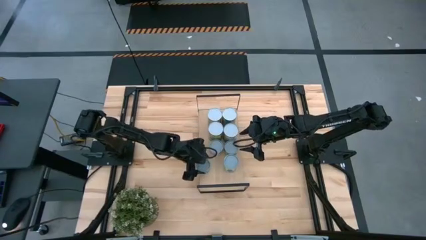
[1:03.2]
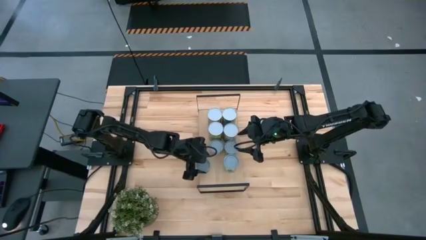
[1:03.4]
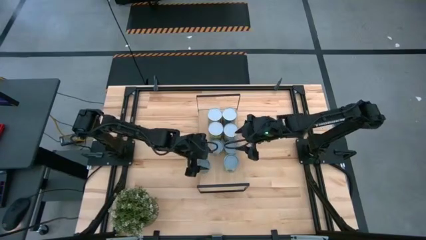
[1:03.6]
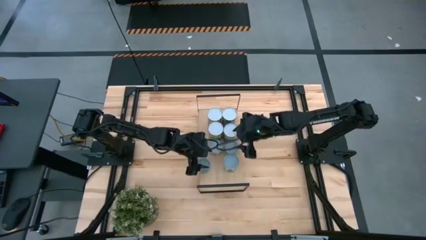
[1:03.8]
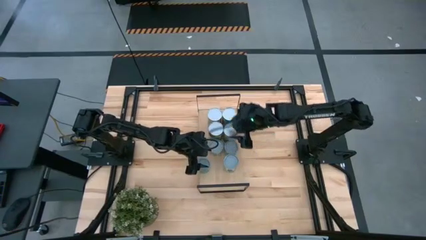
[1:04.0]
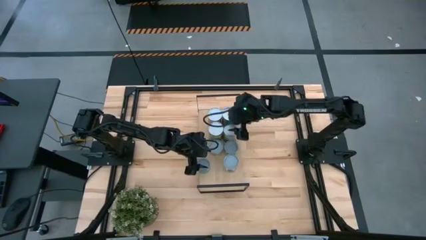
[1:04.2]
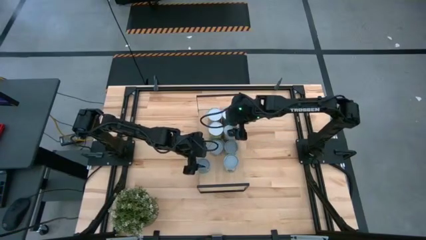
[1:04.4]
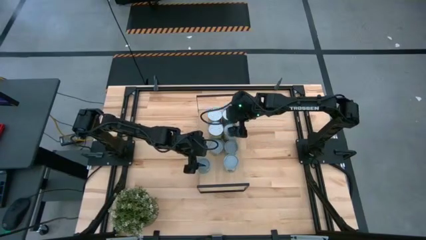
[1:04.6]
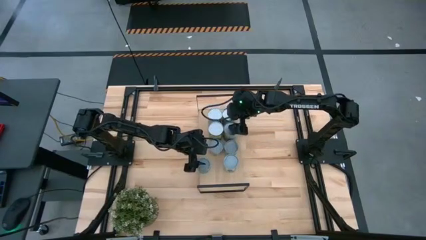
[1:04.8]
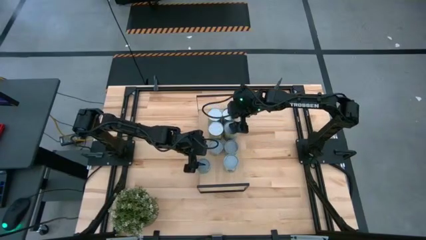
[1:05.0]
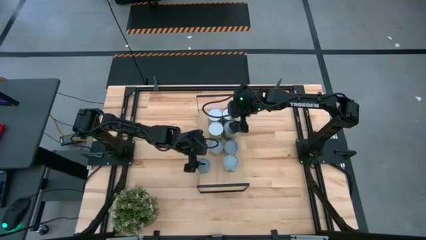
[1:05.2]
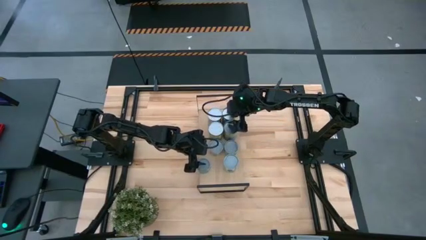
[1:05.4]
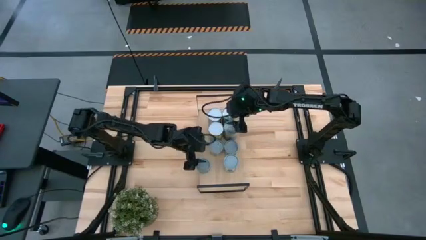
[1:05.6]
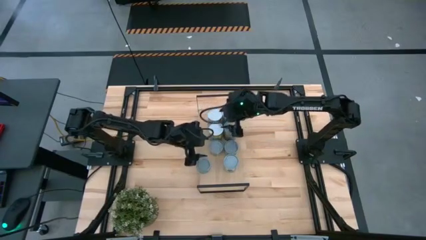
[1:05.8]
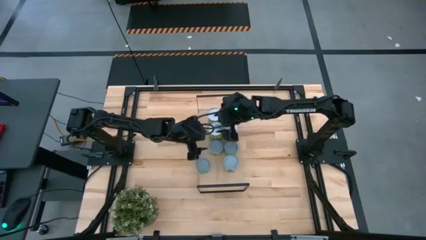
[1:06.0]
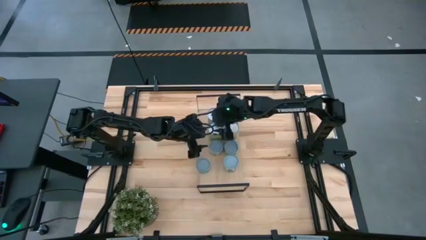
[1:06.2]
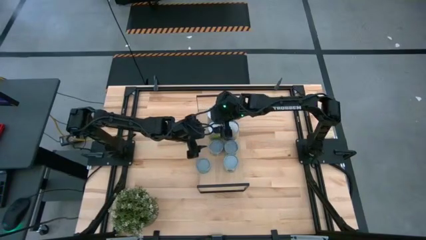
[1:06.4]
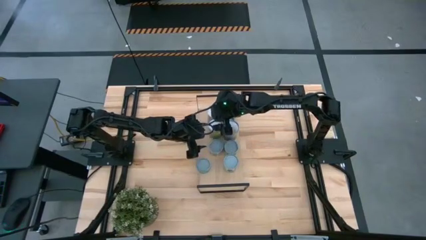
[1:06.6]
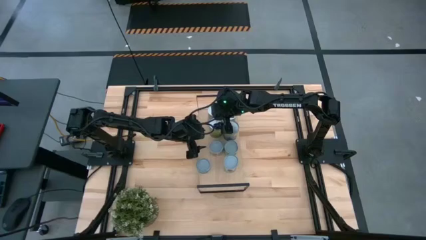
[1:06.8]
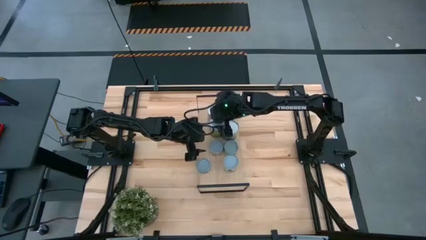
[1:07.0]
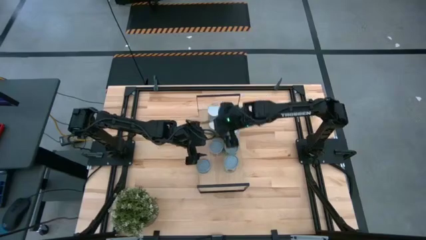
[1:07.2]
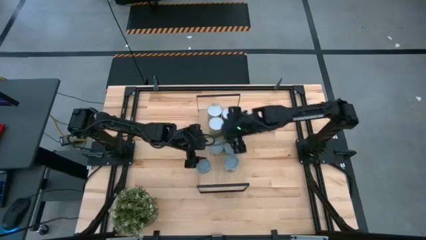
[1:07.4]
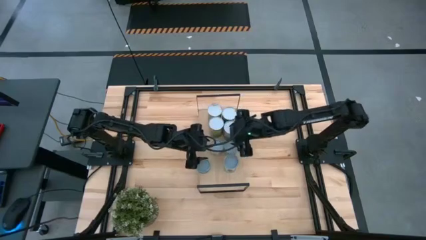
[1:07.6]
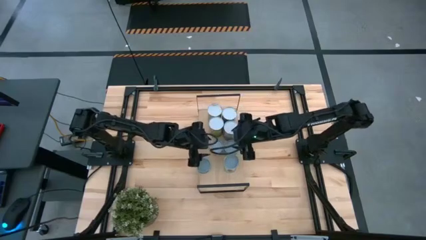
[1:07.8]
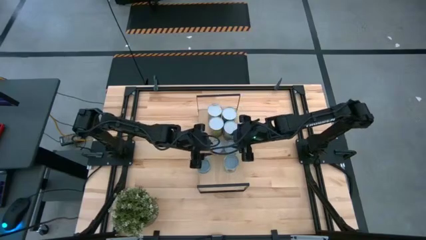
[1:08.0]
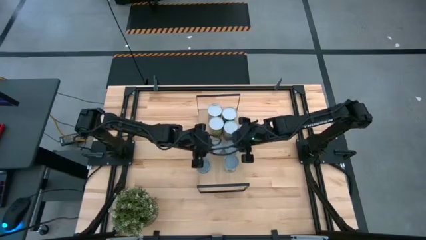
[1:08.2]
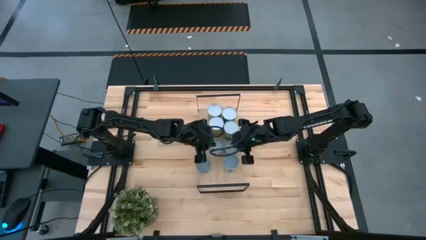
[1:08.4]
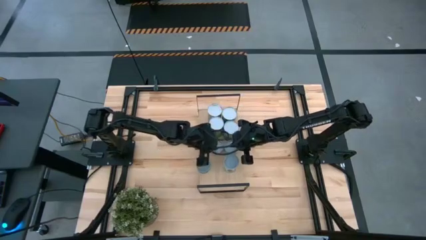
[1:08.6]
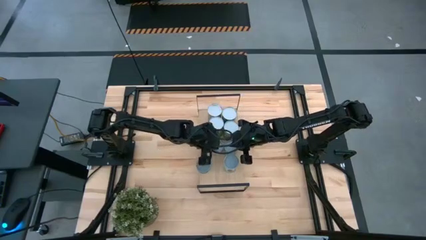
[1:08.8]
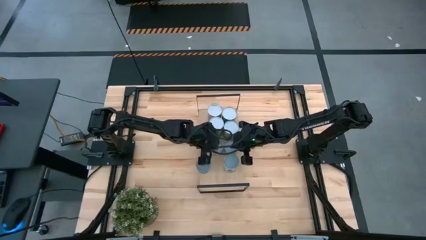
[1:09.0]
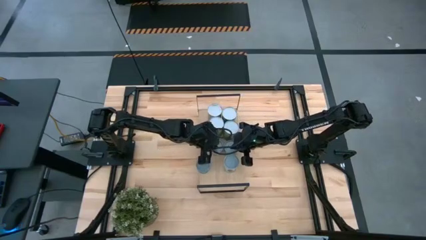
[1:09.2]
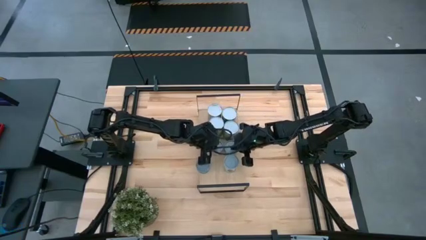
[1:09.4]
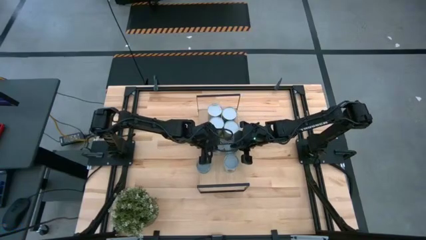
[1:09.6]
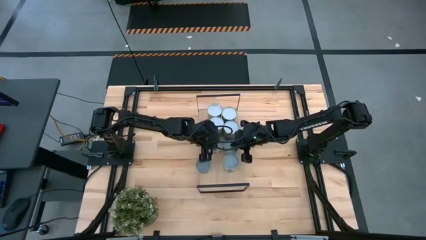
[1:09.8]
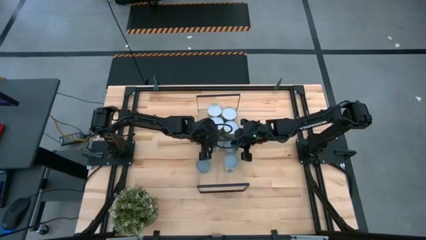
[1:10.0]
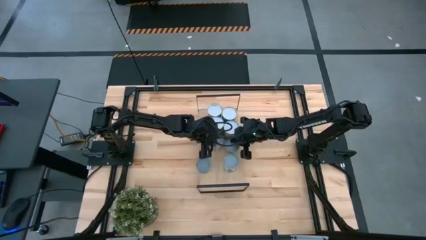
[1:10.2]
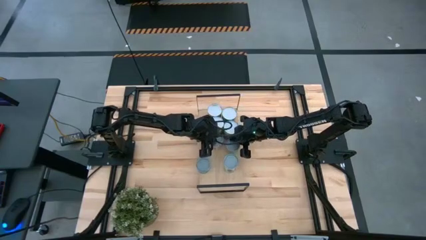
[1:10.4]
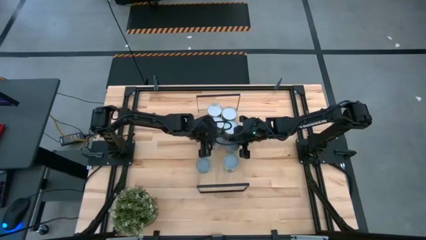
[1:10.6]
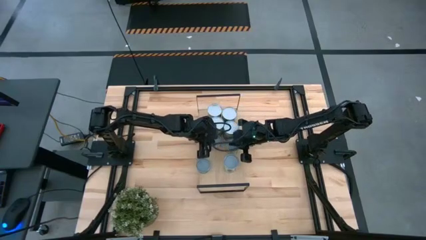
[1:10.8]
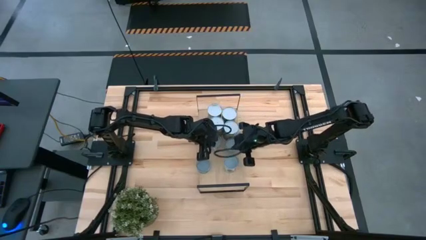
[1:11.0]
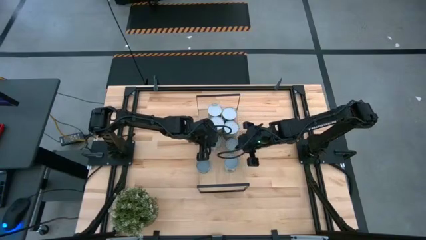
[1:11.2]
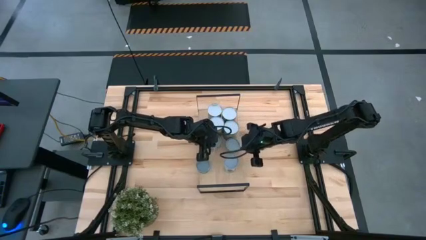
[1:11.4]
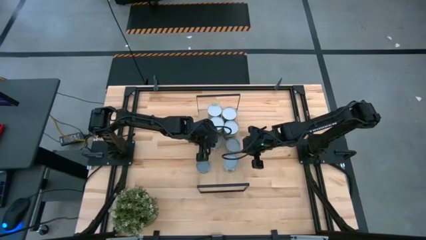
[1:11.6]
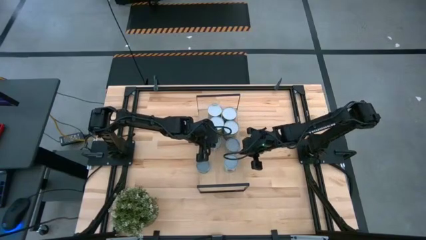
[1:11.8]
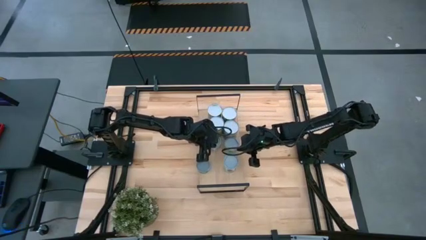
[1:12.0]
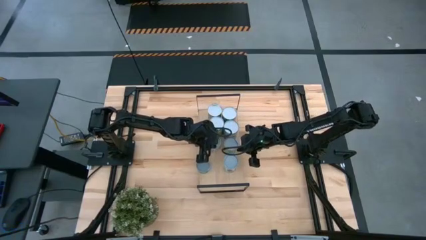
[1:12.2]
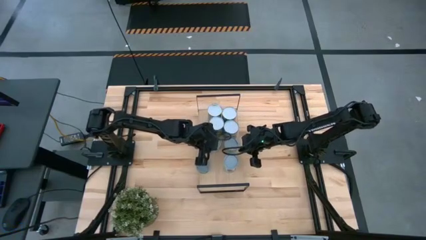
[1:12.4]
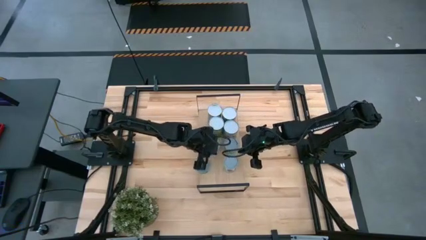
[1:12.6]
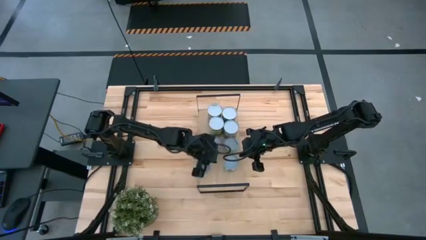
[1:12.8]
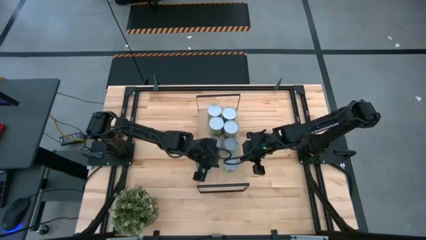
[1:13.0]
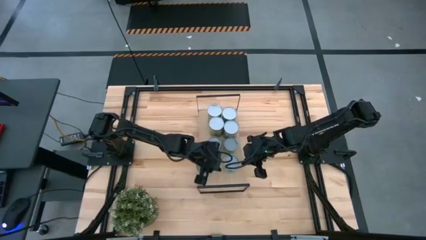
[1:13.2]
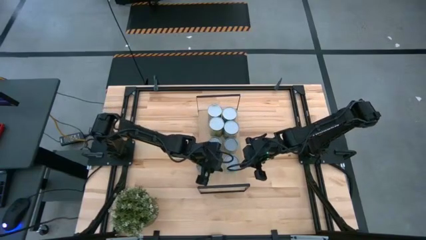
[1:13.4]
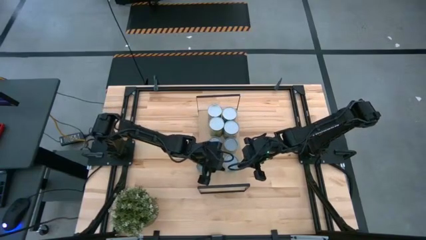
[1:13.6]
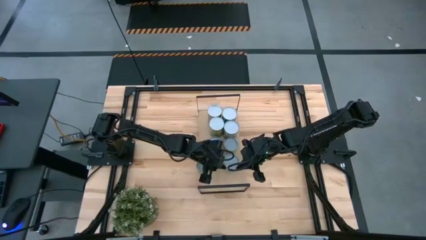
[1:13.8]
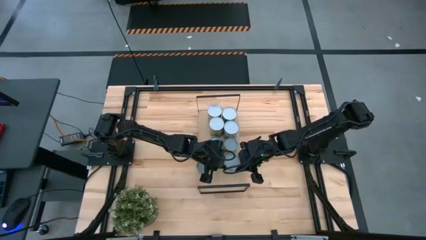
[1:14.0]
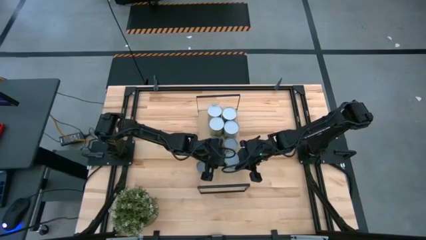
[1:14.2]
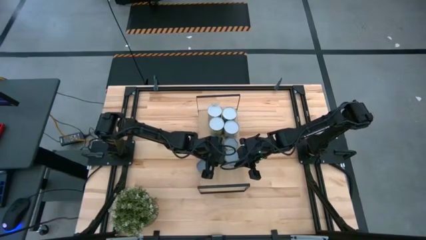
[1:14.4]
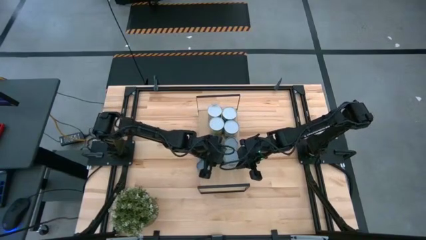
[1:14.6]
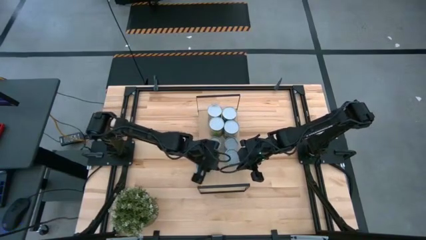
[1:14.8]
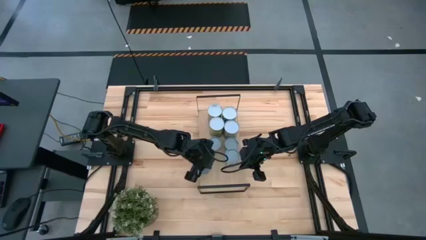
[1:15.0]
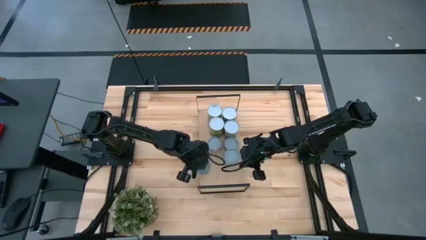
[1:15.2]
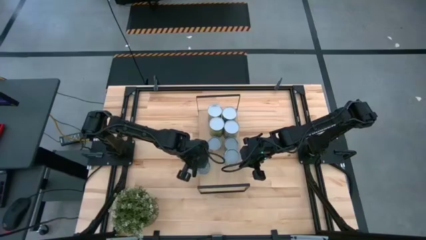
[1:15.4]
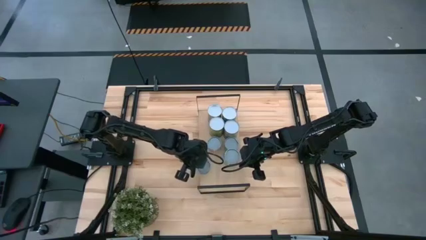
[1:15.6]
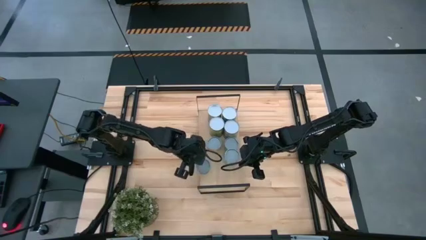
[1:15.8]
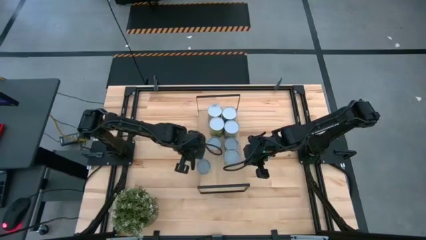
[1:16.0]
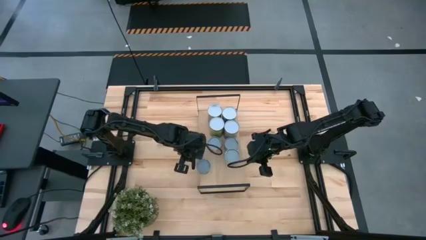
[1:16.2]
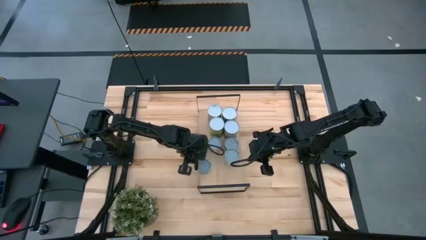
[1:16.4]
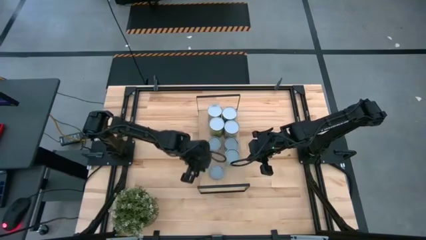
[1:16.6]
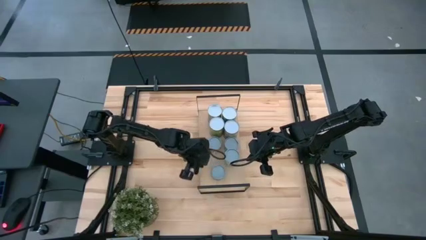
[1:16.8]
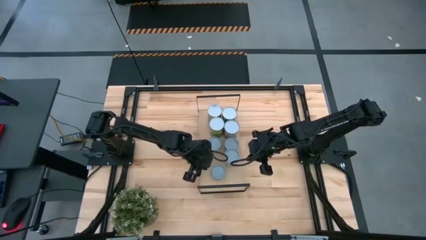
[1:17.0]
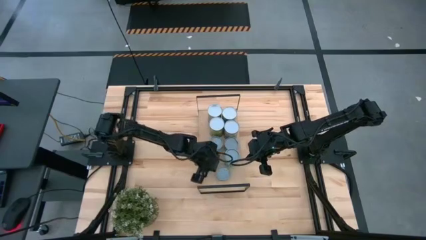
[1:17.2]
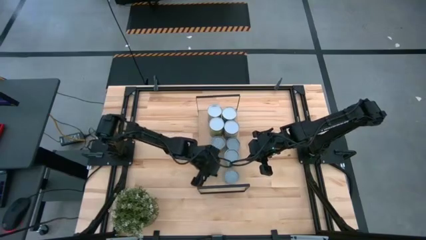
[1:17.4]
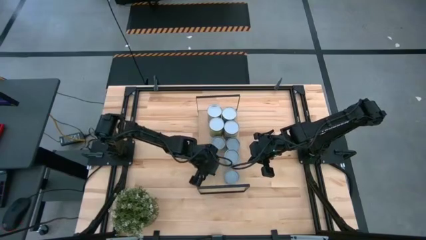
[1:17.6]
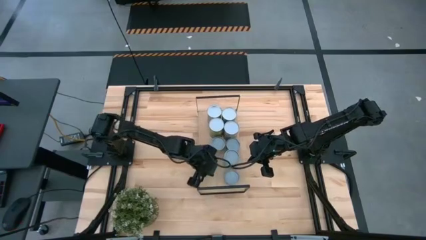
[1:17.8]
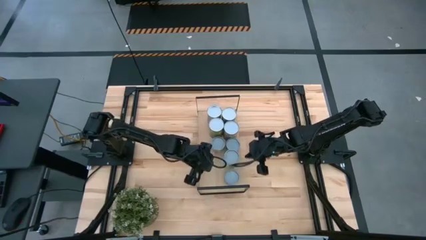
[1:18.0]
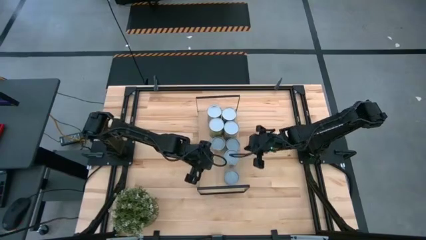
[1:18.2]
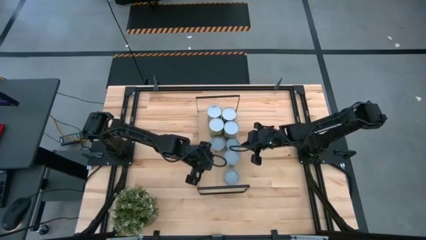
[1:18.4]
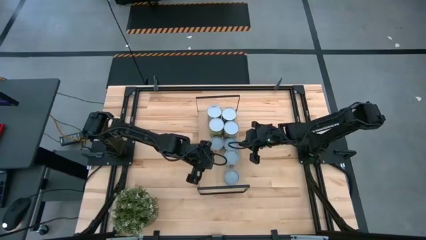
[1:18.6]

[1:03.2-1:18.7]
Task: Pick and place cans onto a shelf
Adjust the cans on the shelf
